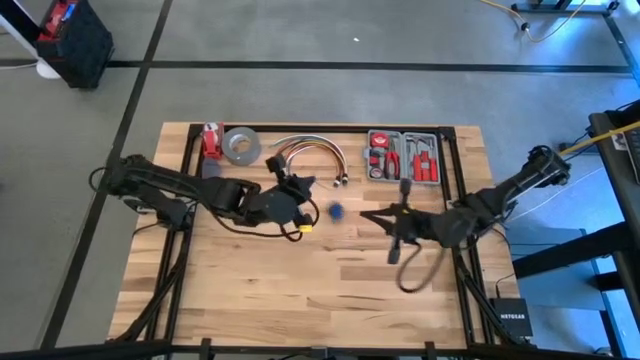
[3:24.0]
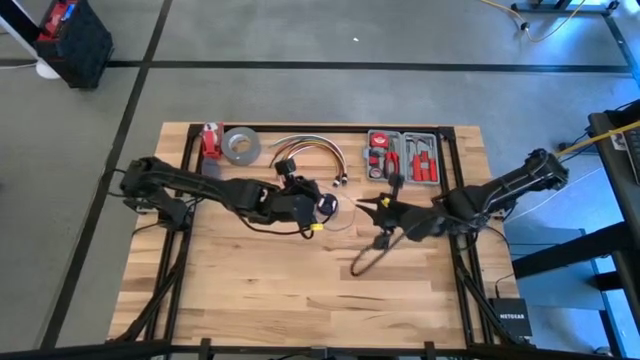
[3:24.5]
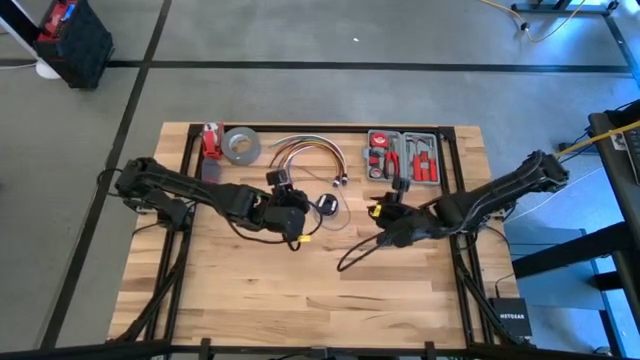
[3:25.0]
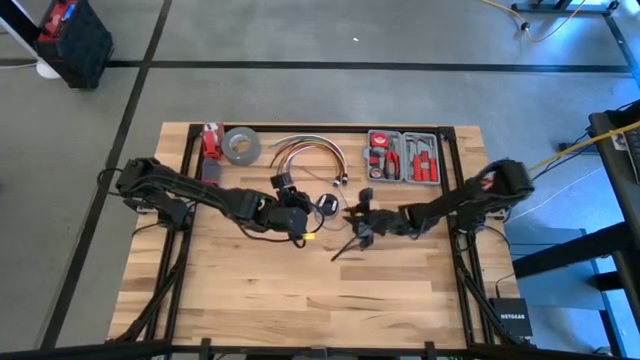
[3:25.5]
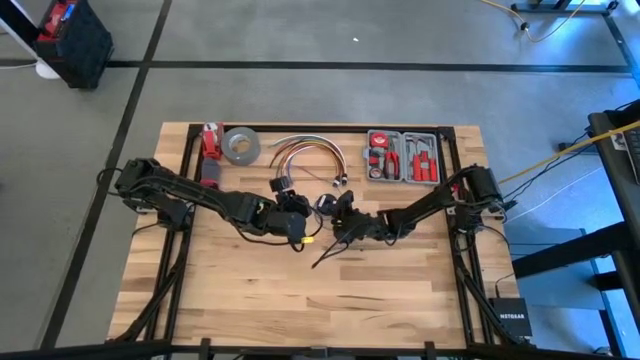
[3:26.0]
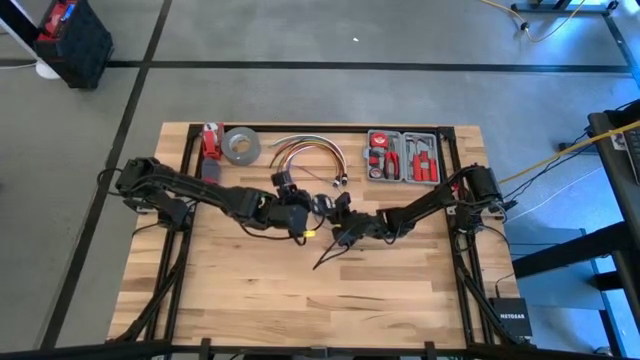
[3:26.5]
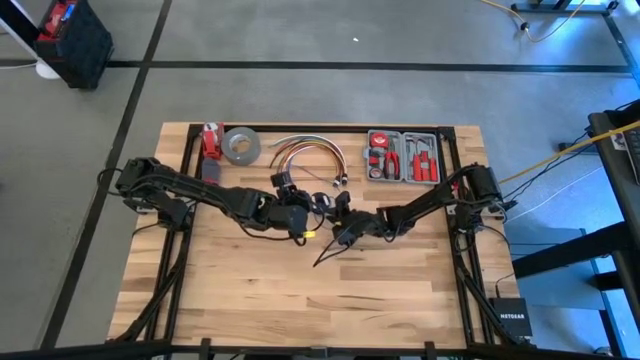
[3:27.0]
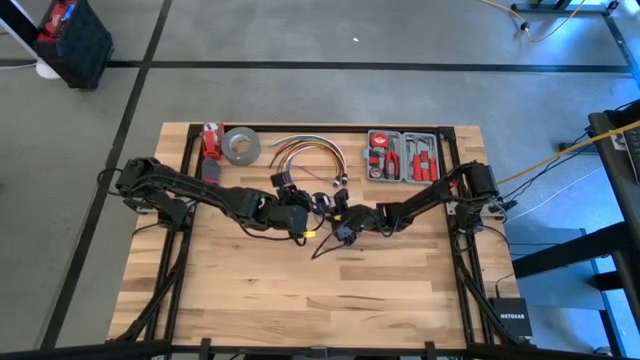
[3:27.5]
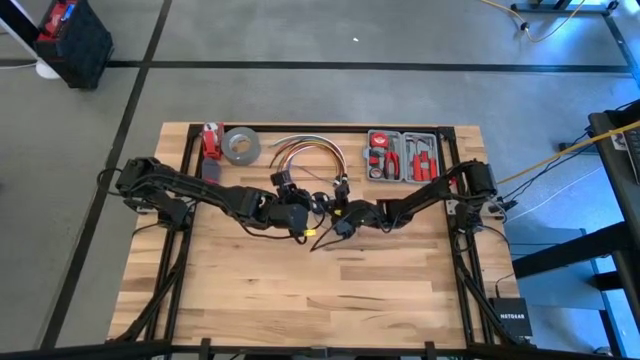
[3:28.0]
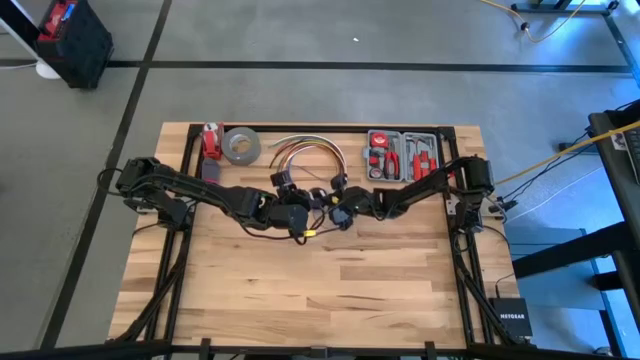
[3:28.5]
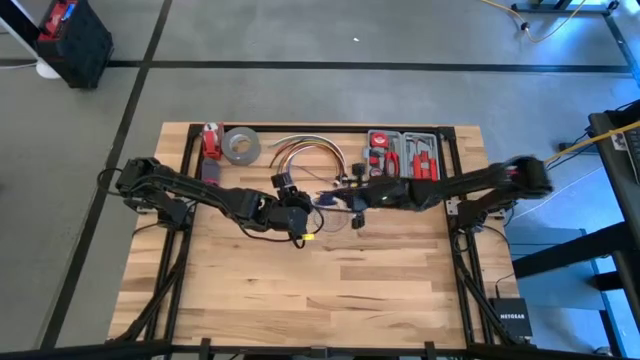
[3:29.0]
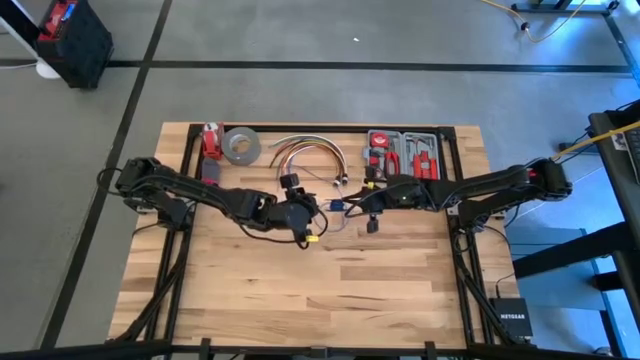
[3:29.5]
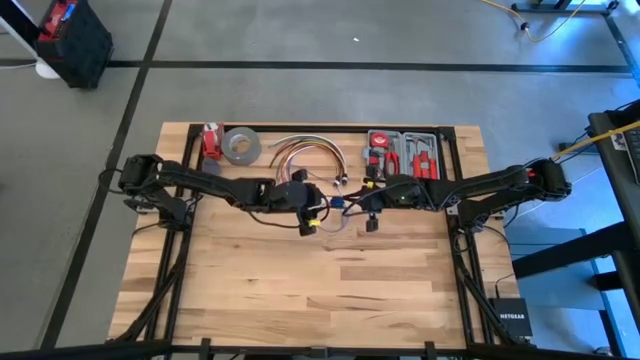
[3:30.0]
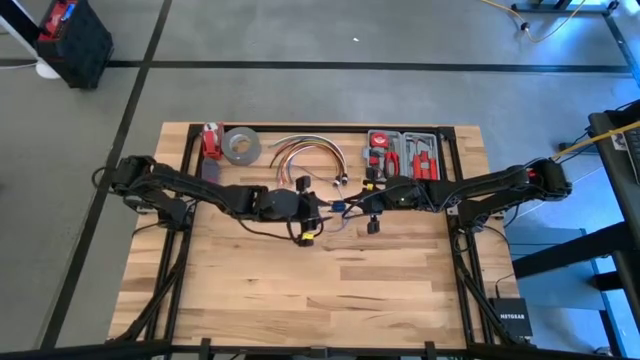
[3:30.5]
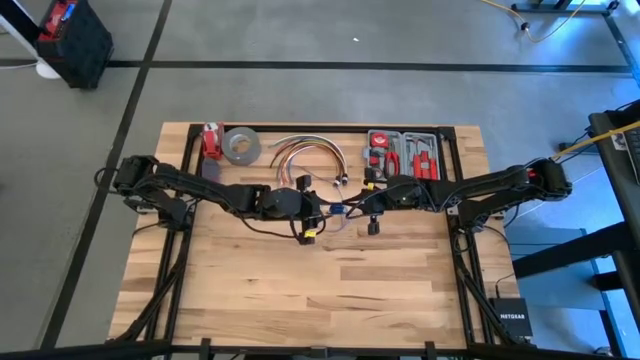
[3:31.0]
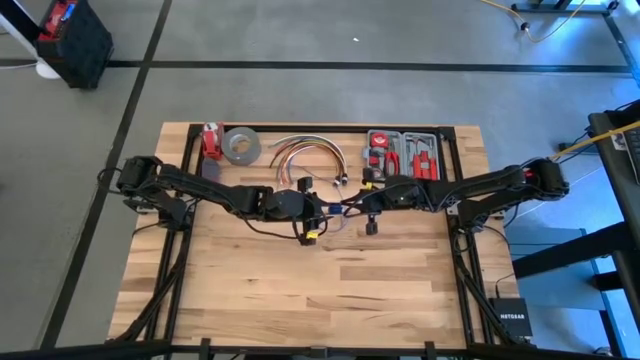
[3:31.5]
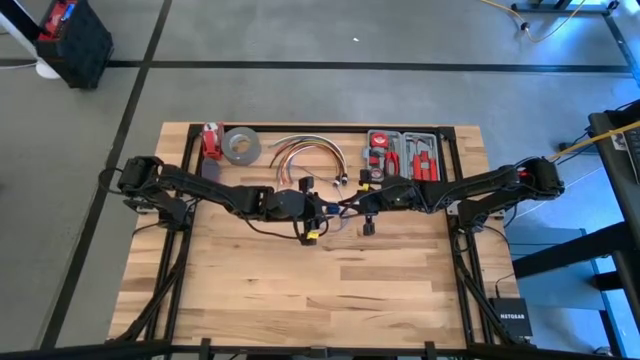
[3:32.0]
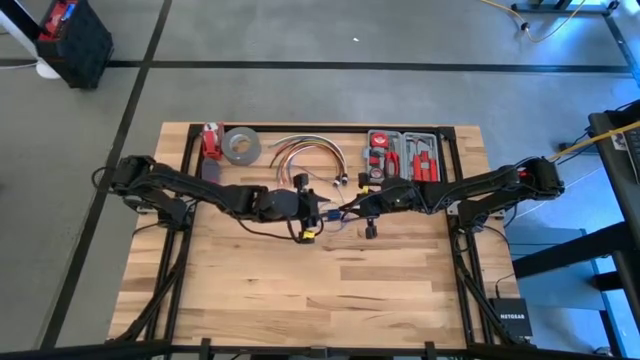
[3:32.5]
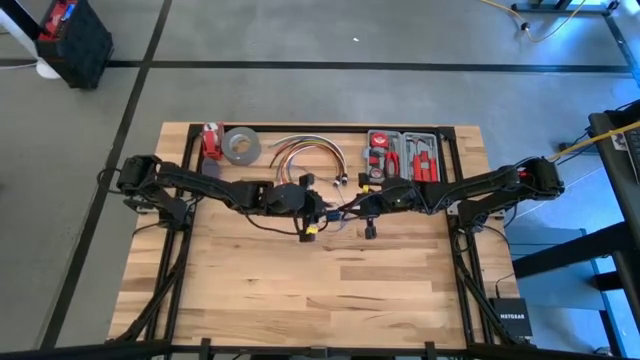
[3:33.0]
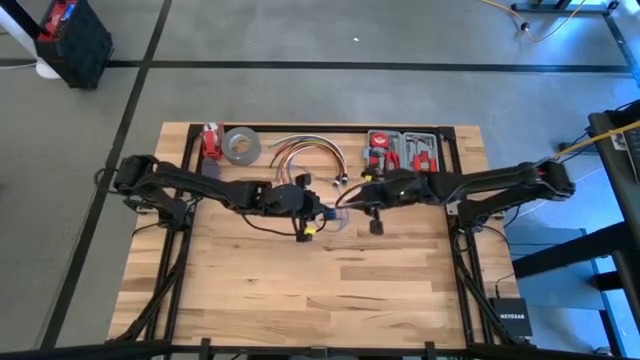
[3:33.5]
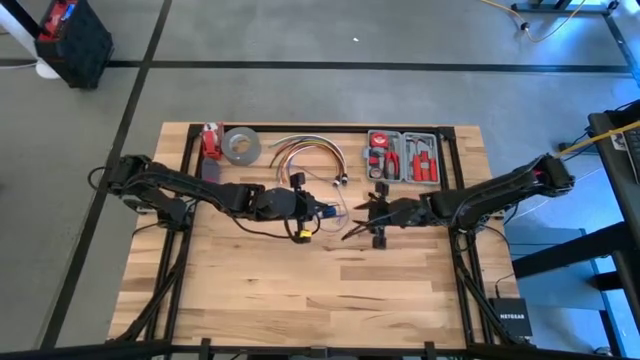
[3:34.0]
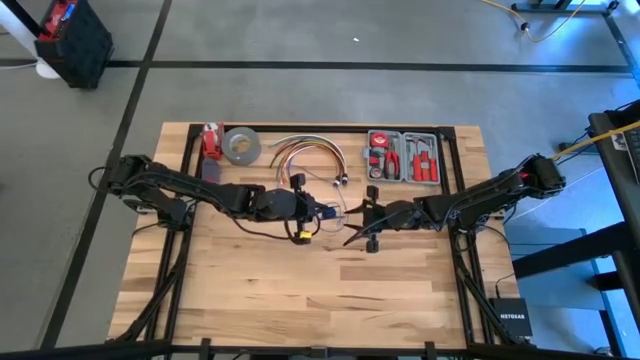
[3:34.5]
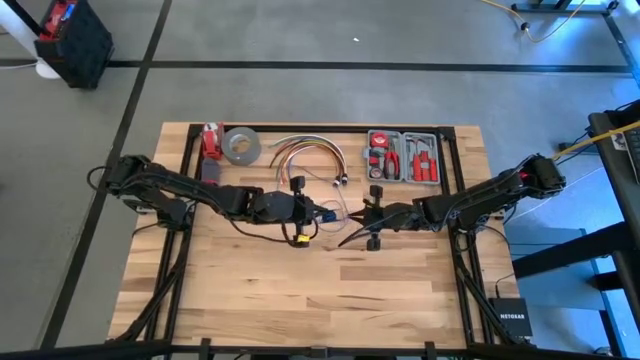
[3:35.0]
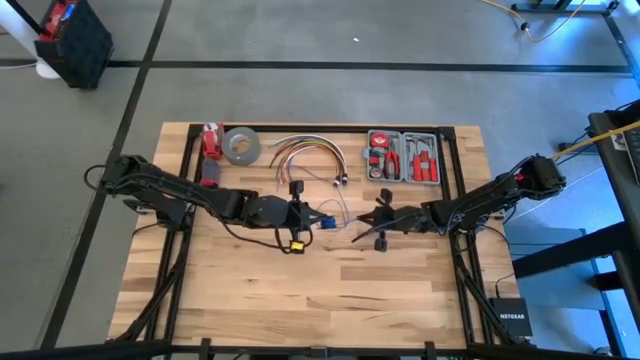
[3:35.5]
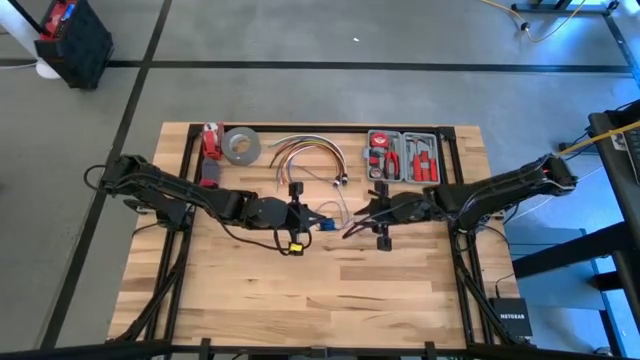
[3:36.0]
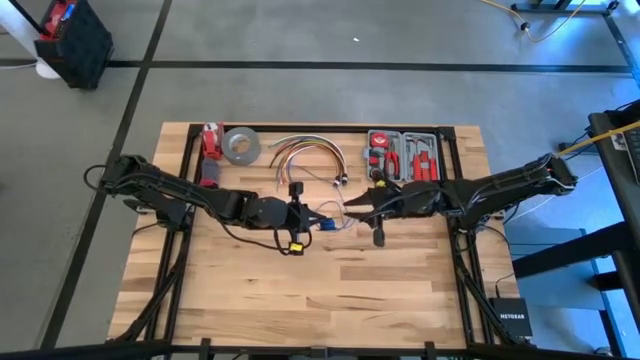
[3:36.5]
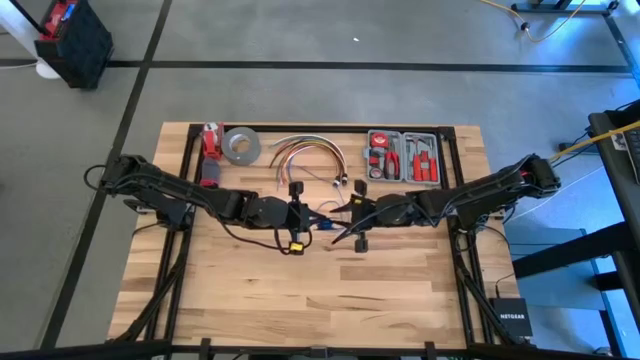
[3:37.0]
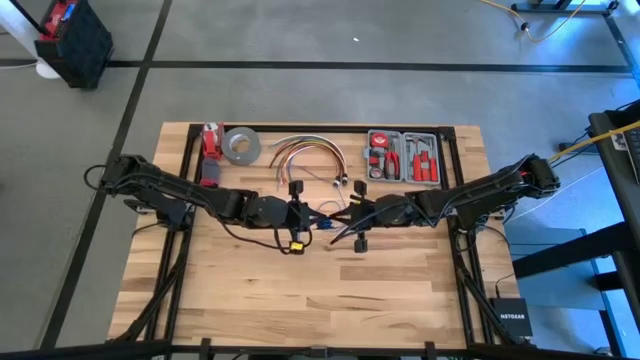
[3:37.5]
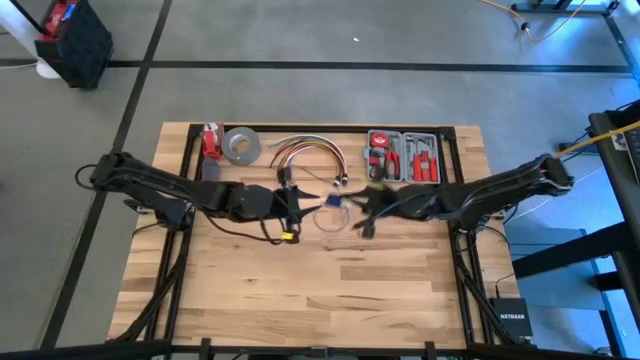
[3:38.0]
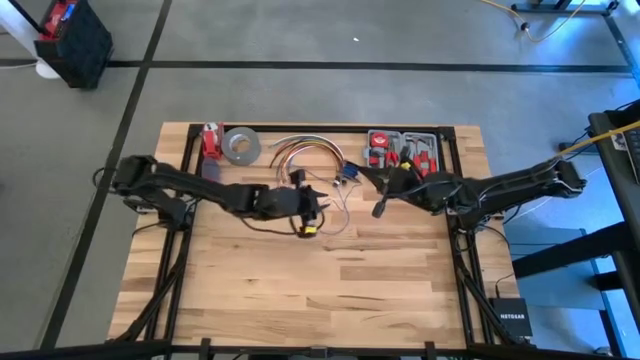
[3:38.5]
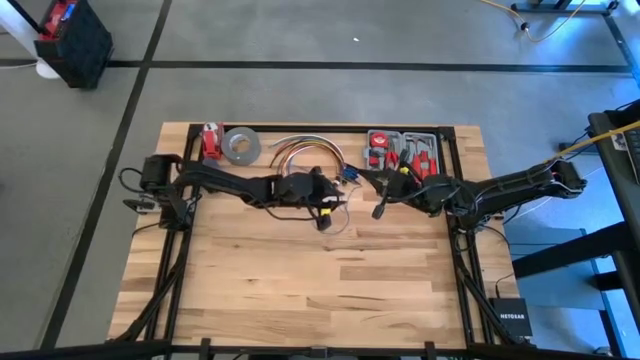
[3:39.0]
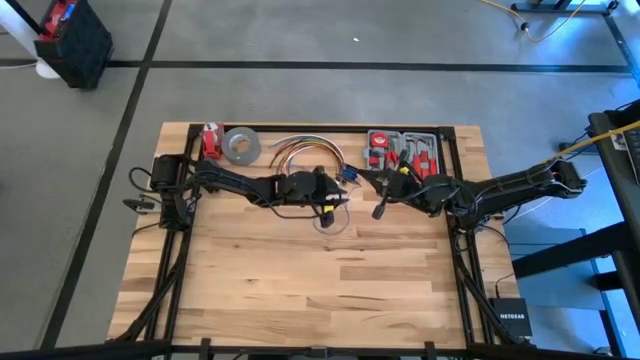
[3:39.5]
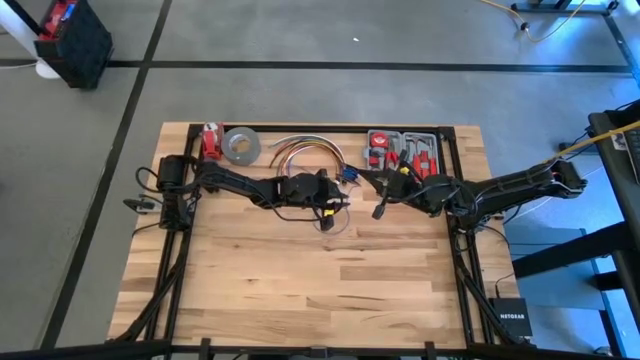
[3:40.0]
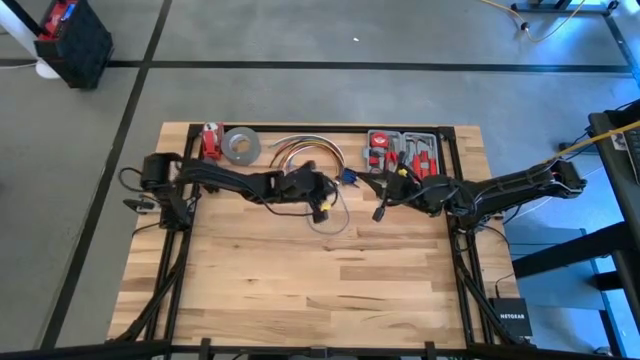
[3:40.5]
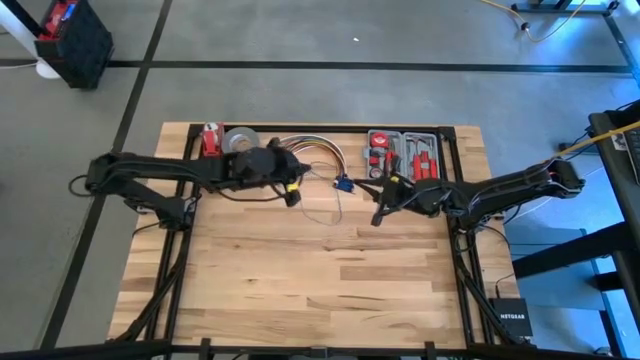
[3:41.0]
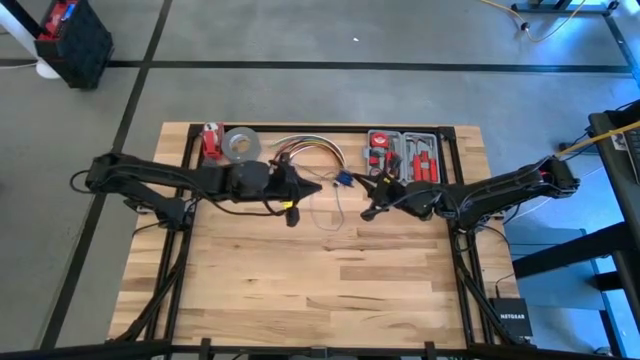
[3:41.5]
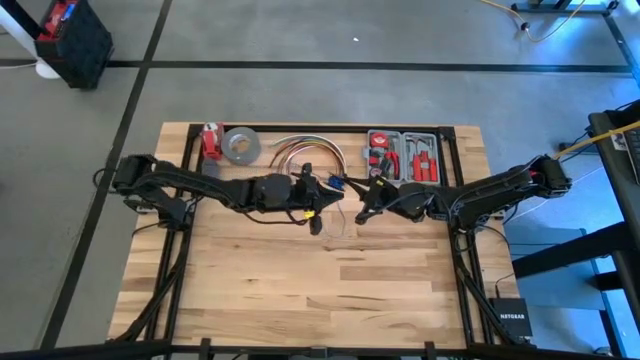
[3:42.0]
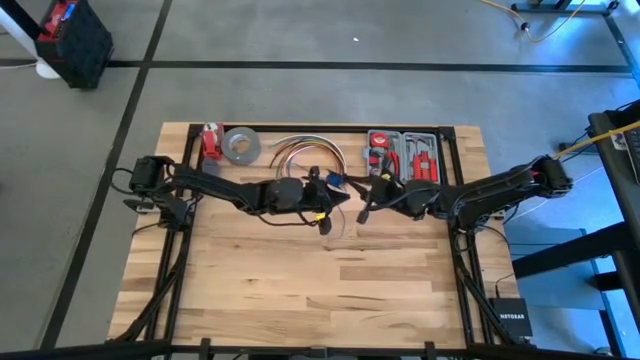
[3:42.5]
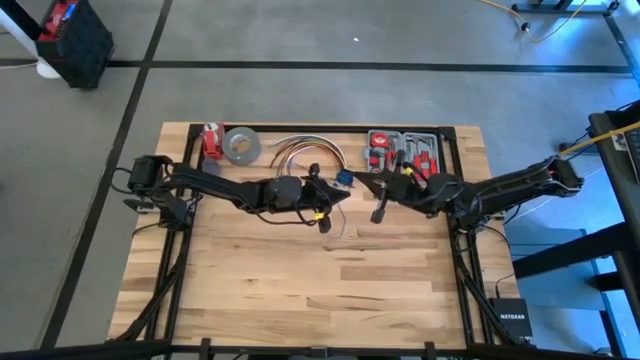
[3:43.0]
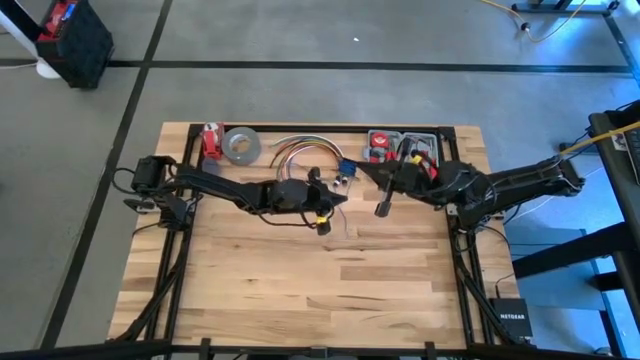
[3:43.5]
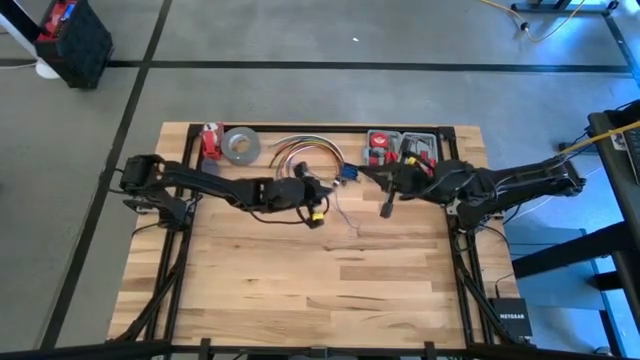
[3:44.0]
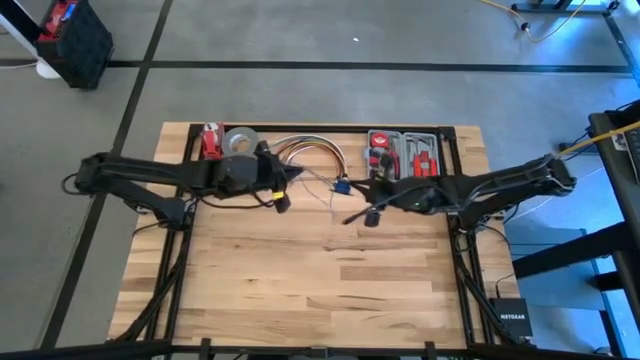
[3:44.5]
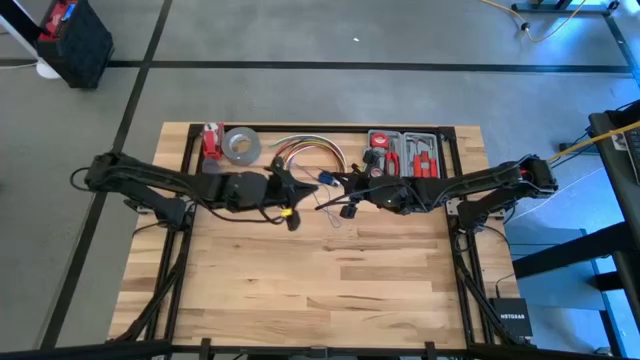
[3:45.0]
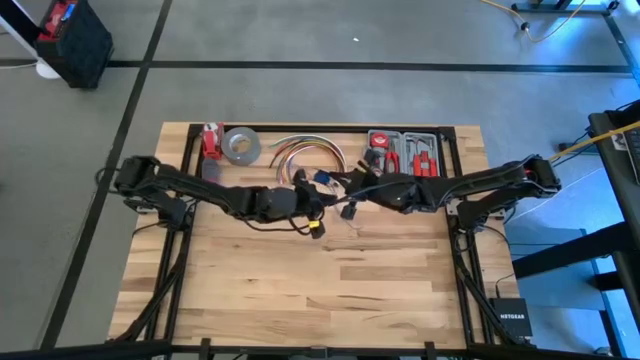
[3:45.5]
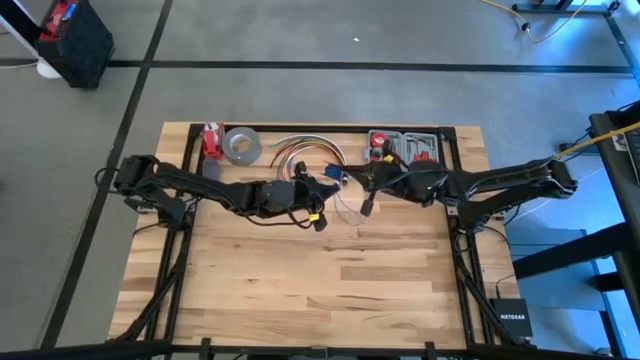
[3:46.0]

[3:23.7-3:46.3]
Task: Coil cords
Coil the blue wire on the black spool
